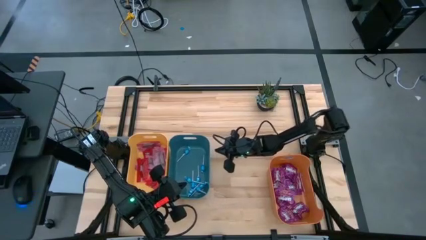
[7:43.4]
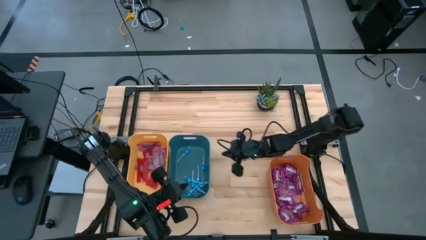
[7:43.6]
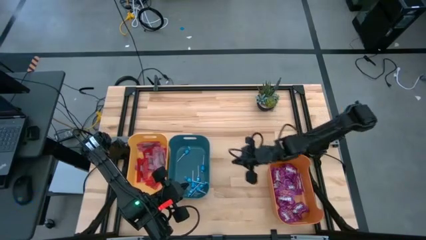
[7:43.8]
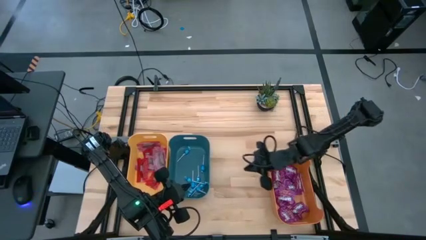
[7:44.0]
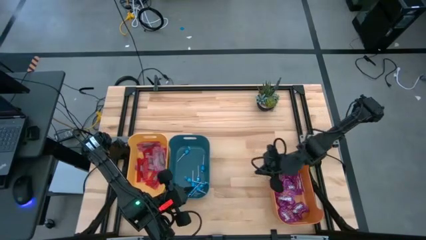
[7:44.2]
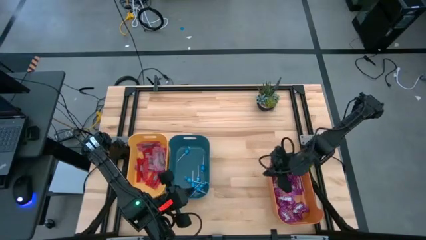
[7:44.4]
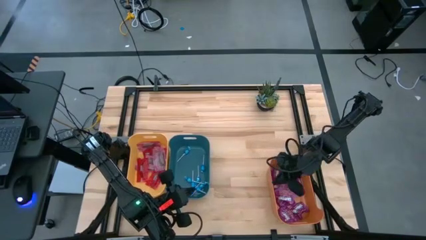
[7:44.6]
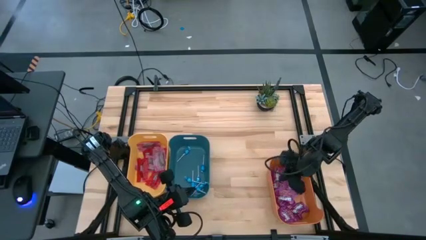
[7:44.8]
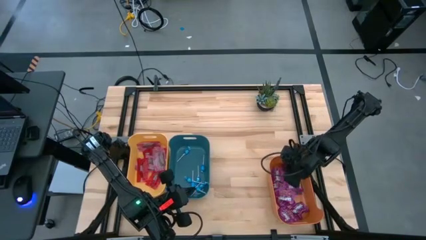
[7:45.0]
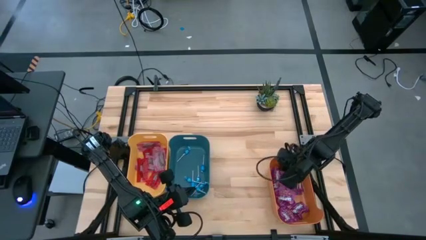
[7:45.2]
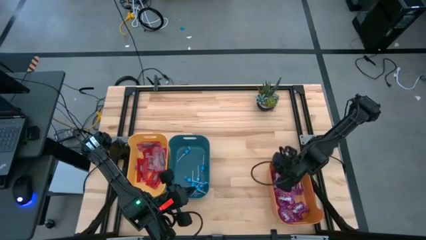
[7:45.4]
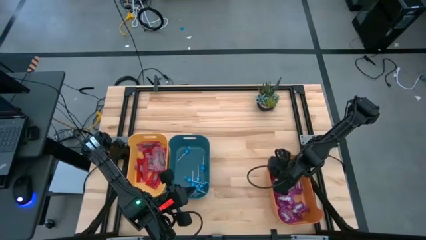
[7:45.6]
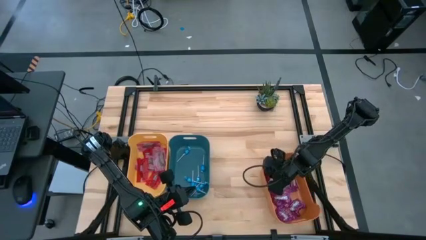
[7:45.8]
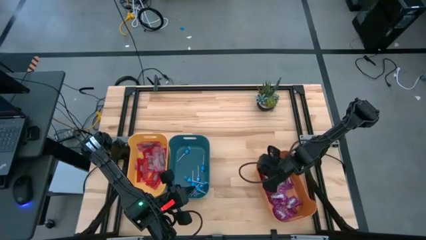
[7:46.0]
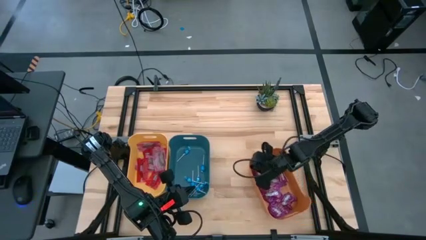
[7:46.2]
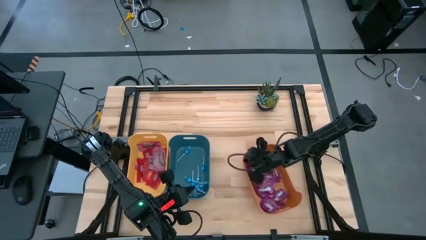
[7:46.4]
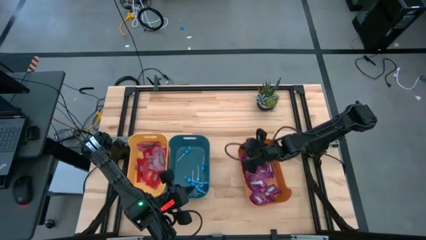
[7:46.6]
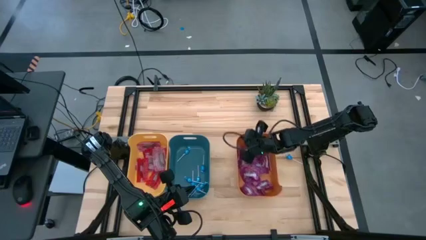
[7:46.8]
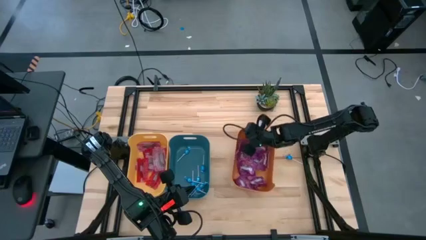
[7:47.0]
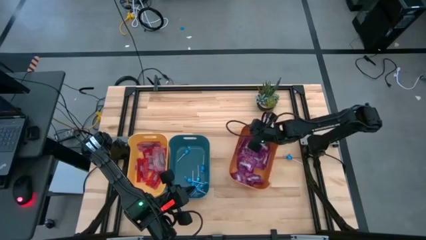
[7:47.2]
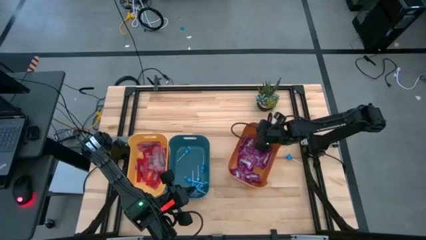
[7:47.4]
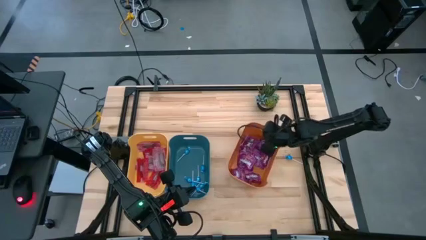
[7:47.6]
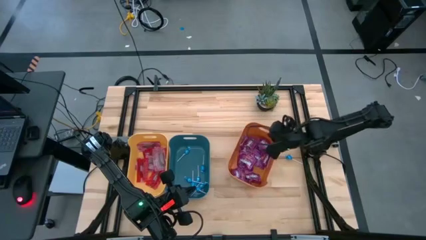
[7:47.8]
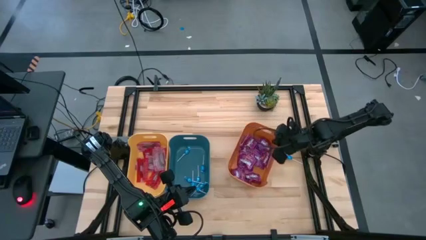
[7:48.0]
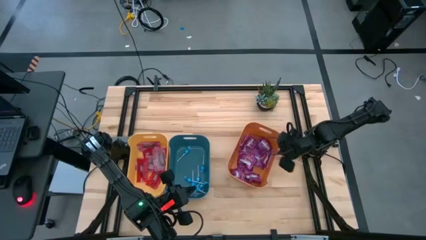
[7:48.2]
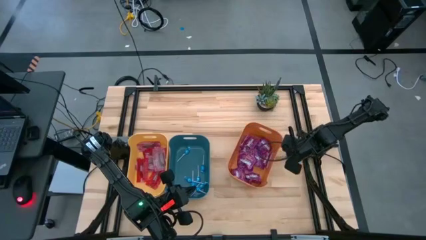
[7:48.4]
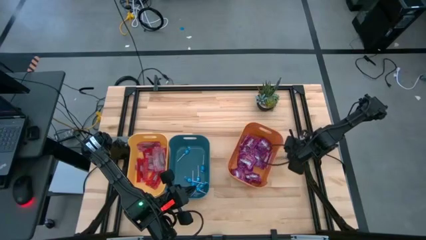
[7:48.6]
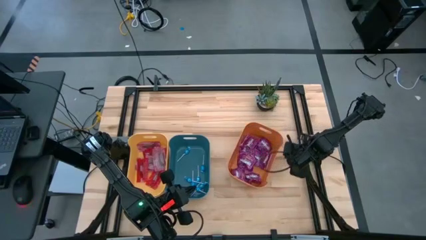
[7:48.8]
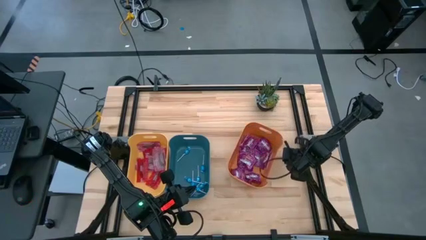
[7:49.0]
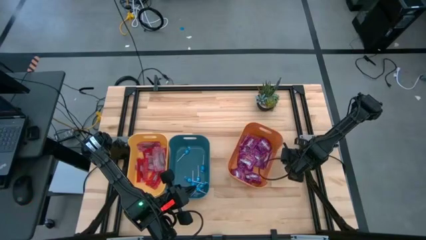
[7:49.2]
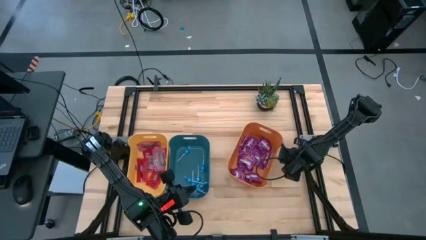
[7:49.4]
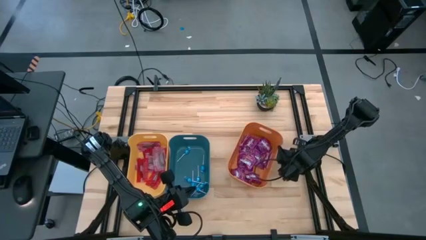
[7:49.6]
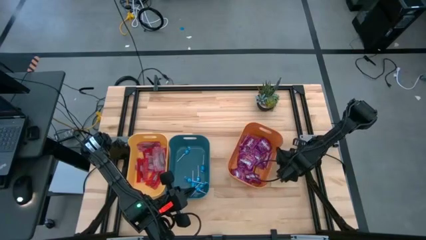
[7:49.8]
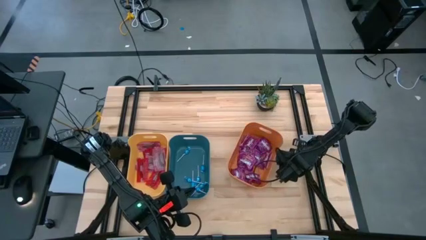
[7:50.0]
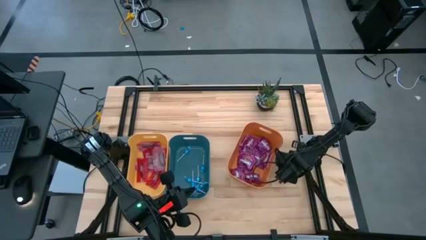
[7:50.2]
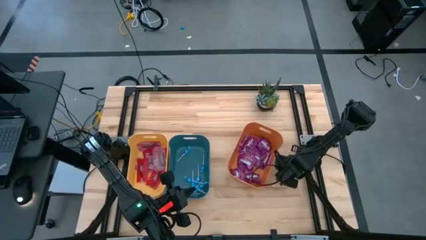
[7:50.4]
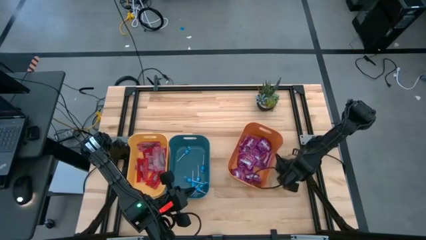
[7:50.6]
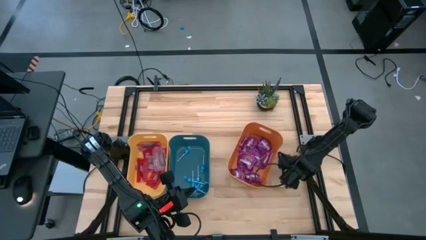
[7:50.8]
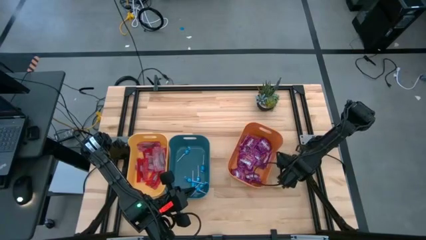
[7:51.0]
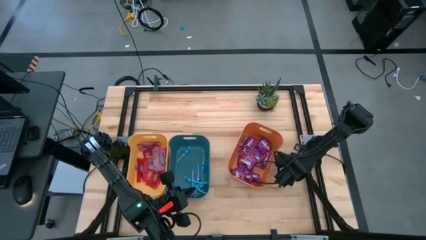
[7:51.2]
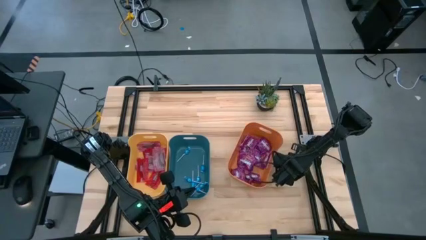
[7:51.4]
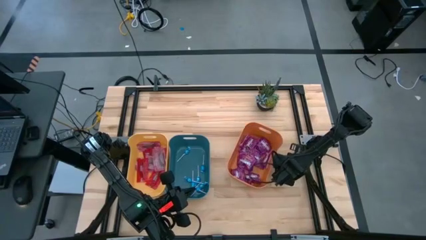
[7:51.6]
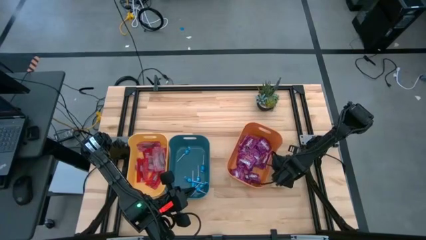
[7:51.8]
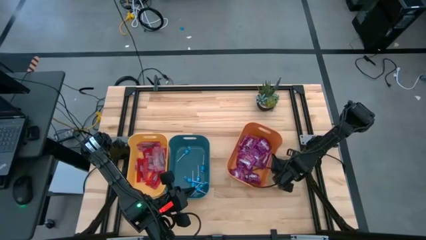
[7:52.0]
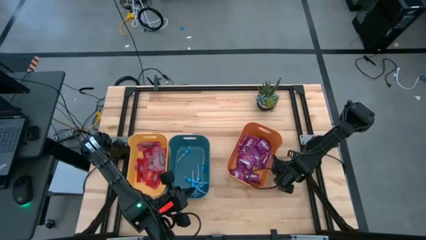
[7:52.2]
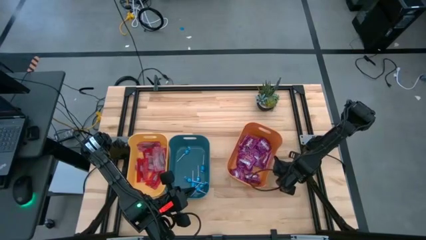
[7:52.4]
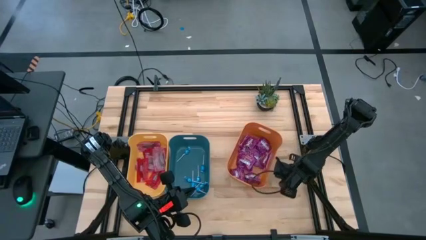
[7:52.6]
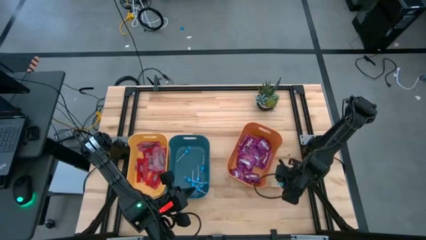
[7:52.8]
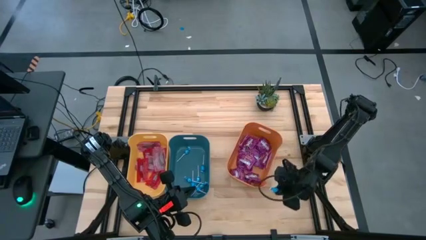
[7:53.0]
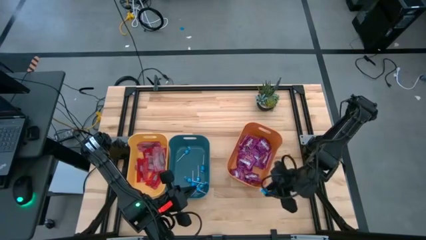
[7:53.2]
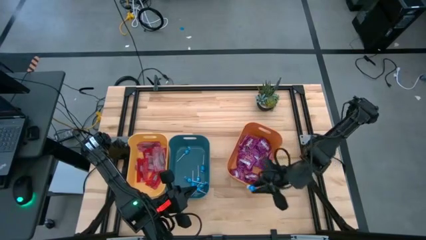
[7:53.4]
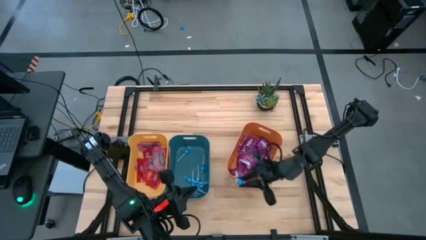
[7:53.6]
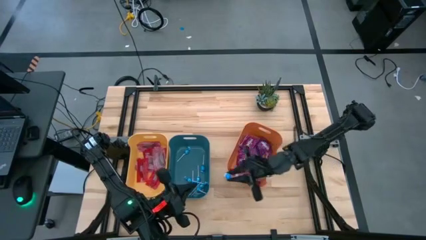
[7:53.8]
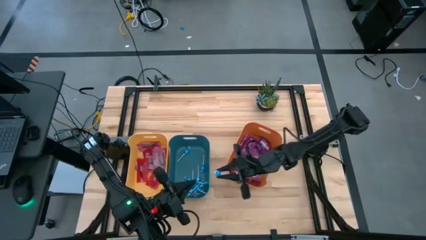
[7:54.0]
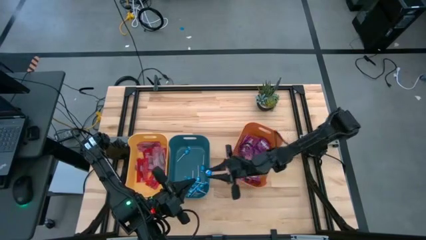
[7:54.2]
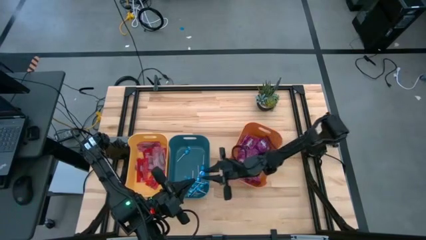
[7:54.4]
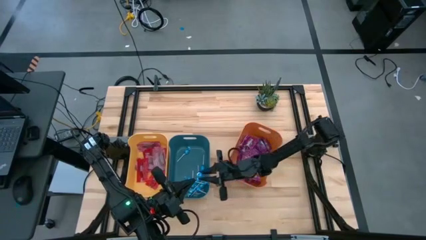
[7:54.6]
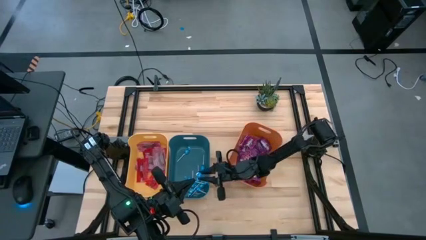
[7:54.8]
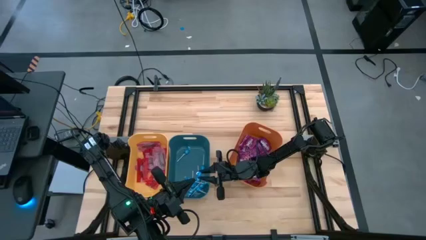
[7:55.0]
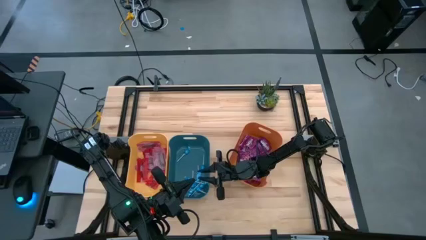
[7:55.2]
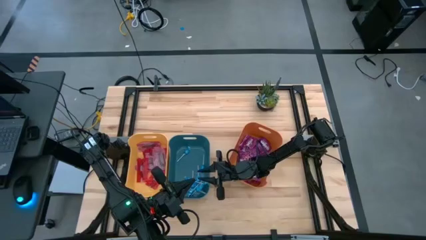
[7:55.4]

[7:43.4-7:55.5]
Task: Sort candy
Put the blue candy into the blue bin

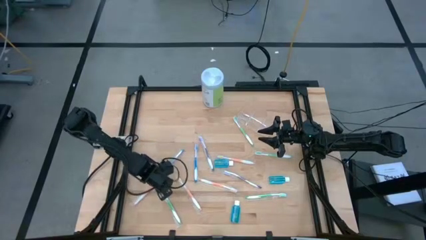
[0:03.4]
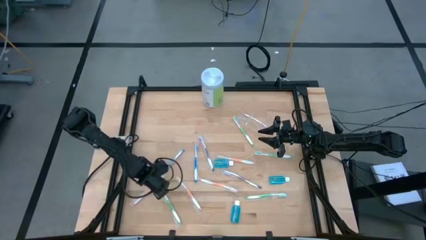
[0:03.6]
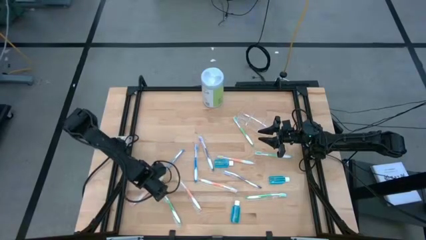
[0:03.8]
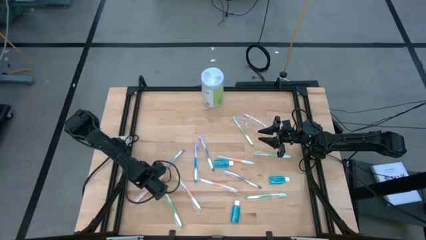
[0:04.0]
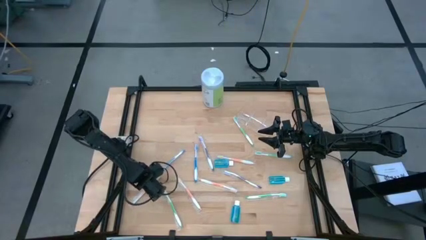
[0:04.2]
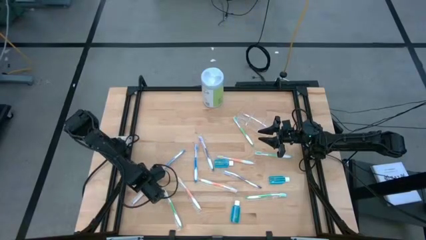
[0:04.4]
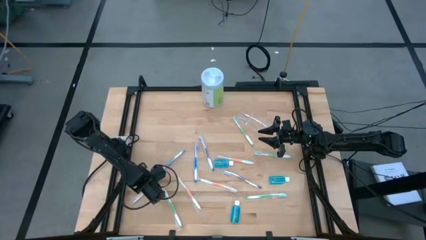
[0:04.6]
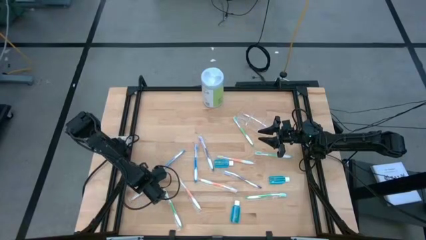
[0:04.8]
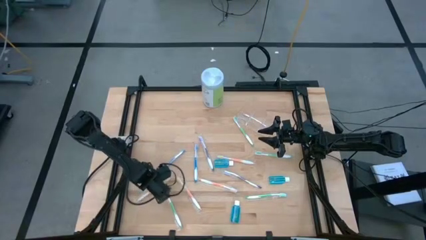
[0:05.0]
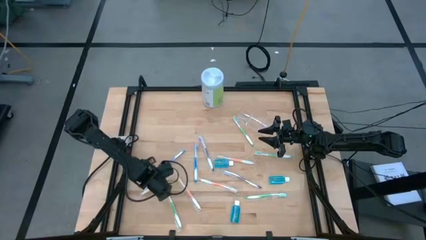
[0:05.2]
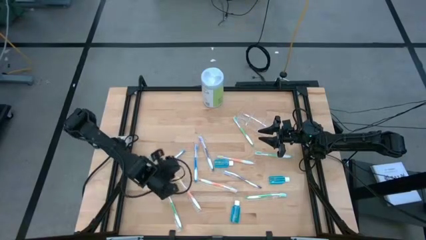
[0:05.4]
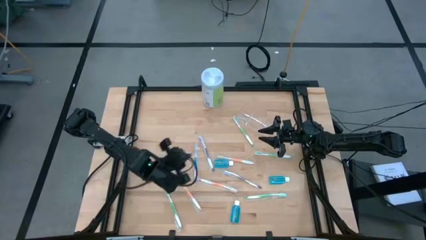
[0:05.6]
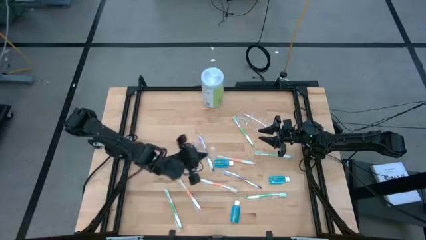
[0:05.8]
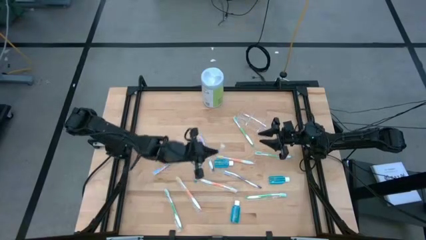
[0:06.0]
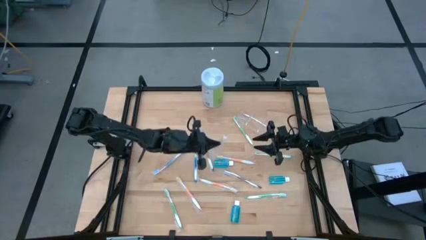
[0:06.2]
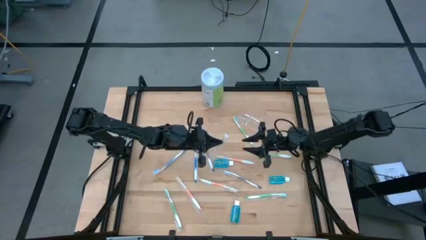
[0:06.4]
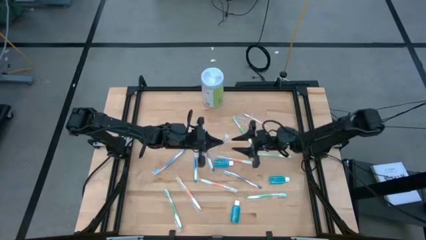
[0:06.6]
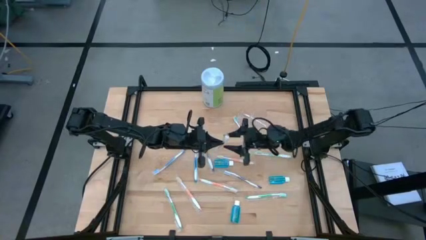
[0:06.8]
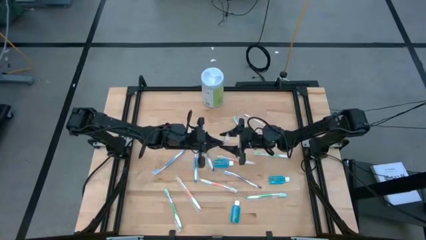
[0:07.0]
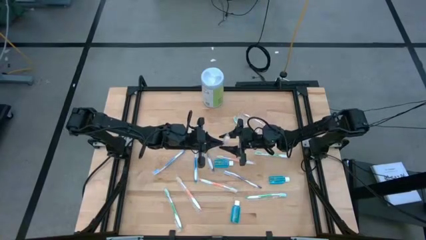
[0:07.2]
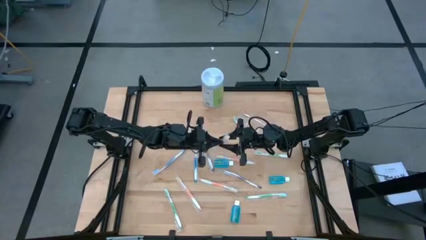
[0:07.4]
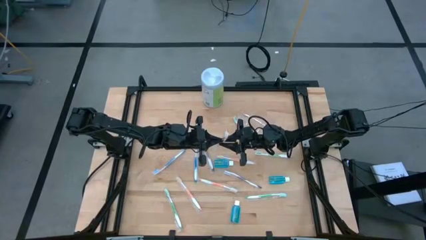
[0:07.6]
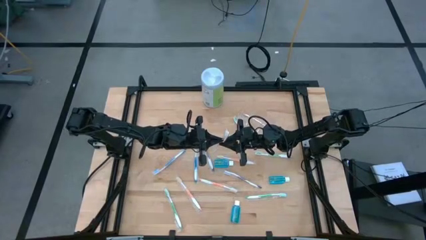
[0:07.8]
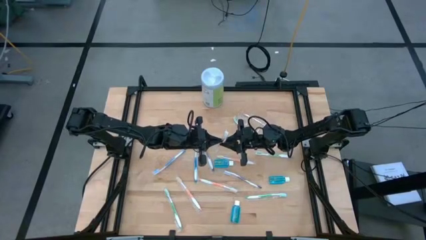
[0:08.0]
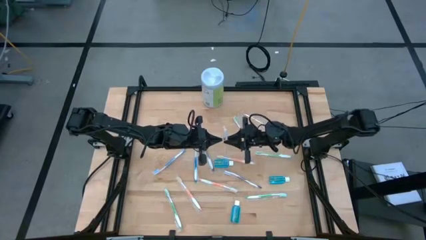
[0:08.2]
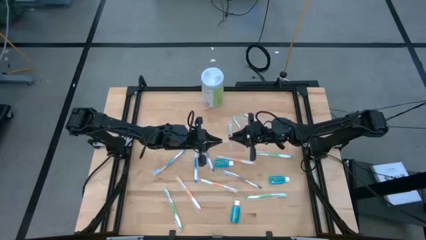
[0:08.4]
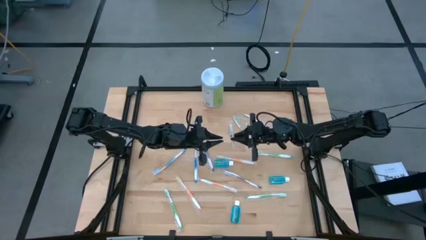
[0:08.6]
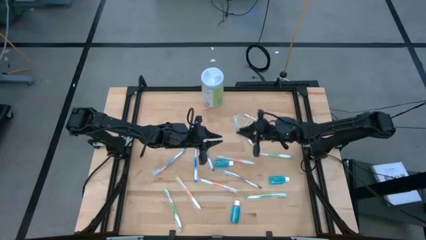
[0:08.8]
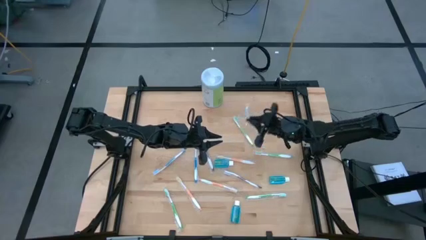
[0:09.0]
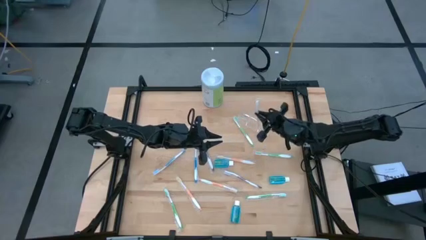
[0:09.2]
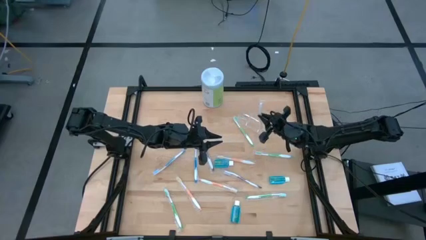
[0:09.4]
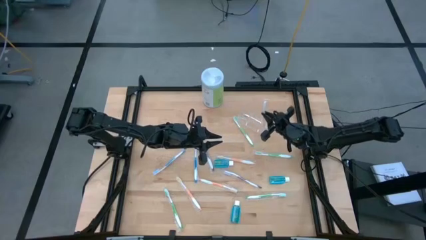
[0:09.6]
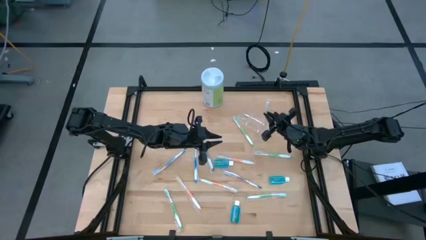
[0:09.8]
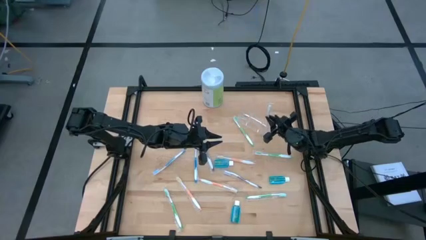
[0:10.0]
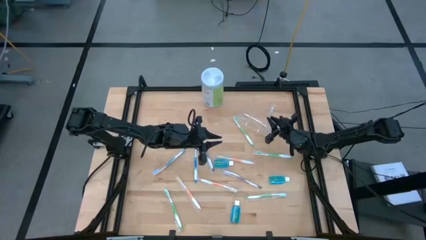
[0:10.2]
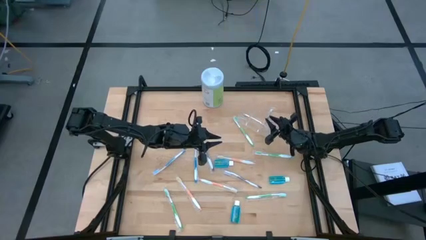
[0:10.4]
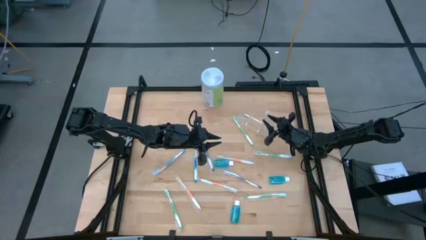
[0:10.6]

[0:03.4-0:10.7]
Task: Pick & Place toothbrushing station
Put the orange toothbrush into the transparent organizer
